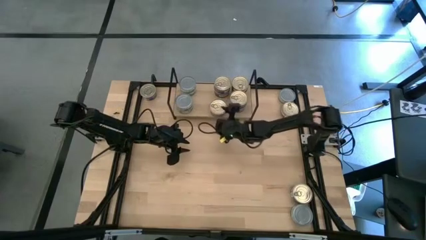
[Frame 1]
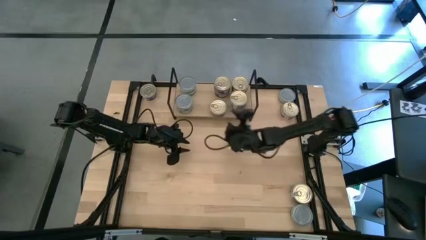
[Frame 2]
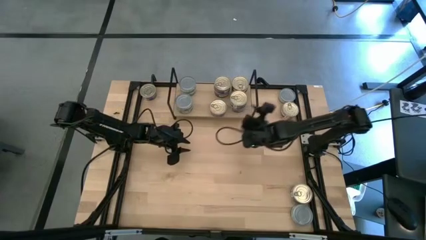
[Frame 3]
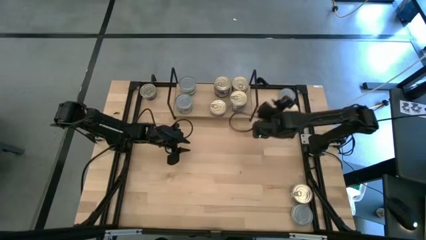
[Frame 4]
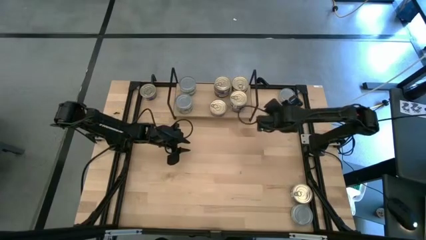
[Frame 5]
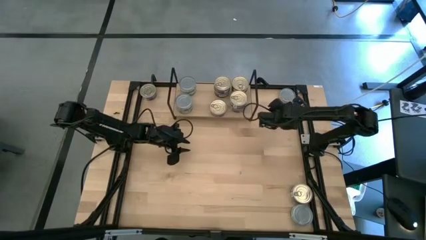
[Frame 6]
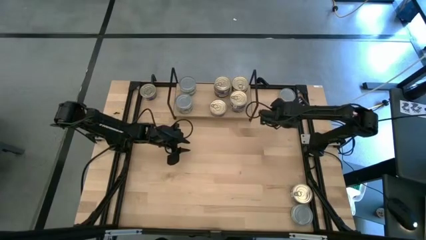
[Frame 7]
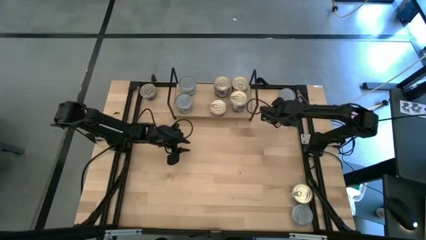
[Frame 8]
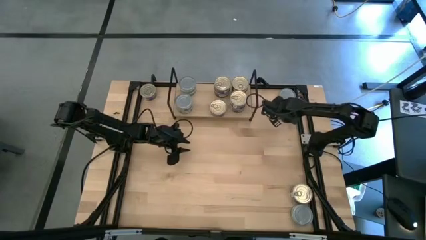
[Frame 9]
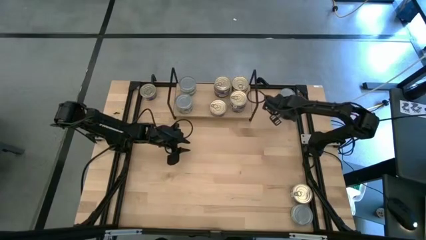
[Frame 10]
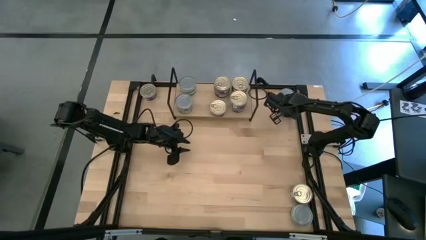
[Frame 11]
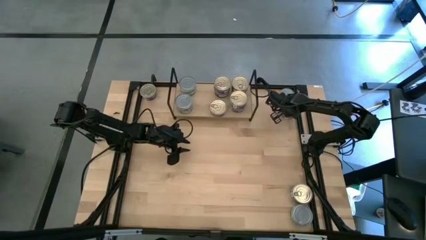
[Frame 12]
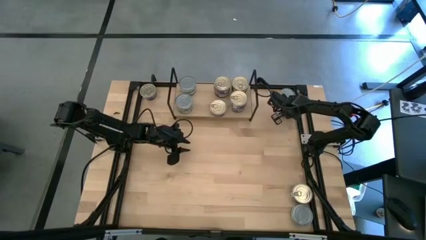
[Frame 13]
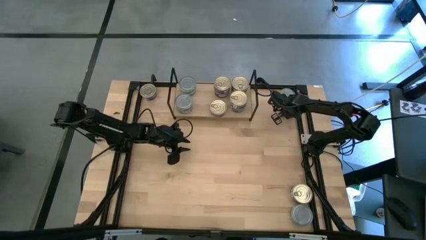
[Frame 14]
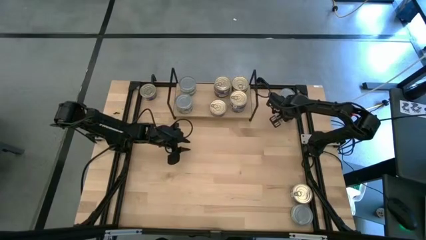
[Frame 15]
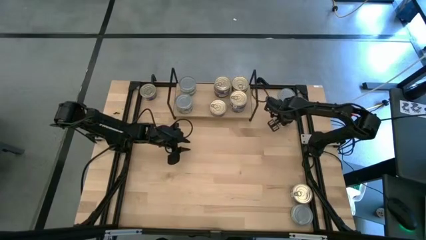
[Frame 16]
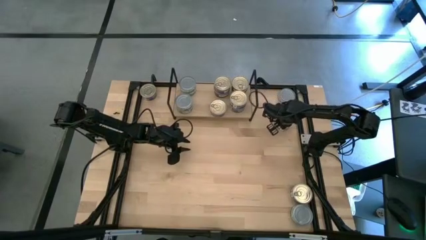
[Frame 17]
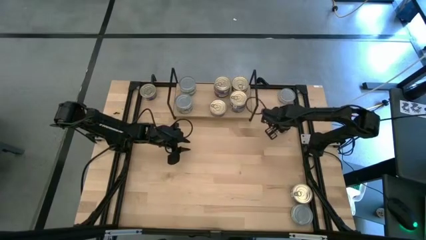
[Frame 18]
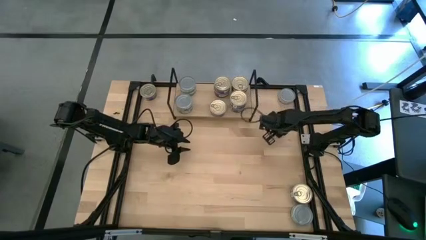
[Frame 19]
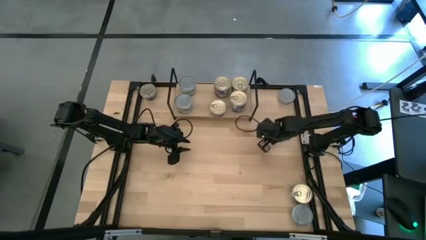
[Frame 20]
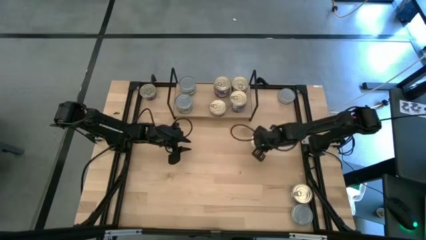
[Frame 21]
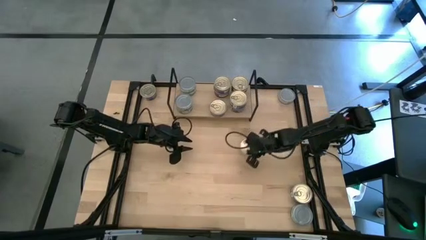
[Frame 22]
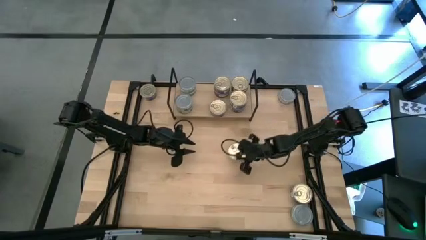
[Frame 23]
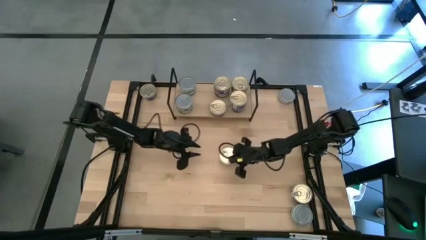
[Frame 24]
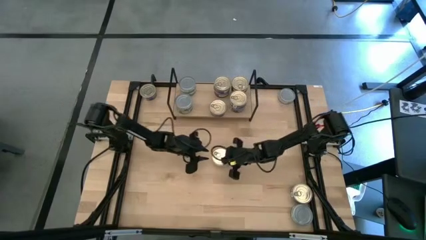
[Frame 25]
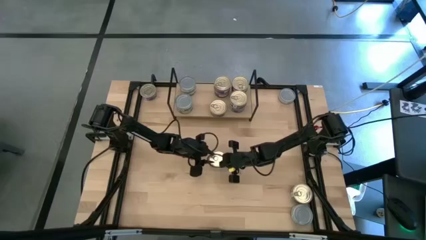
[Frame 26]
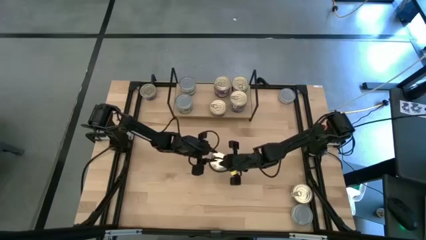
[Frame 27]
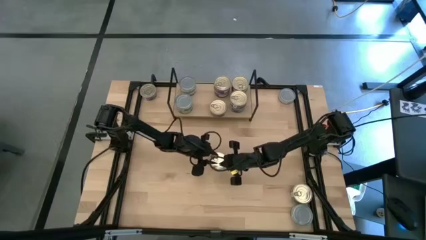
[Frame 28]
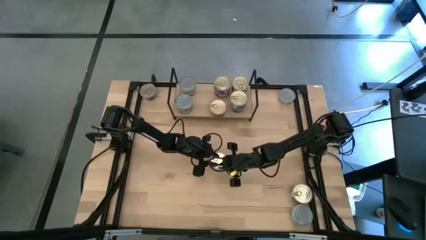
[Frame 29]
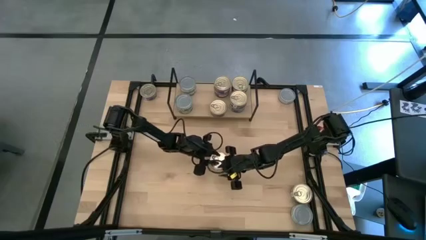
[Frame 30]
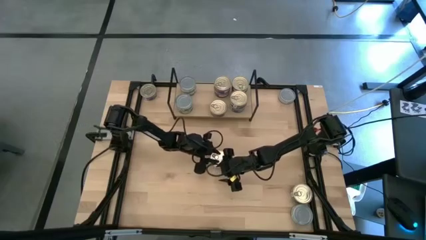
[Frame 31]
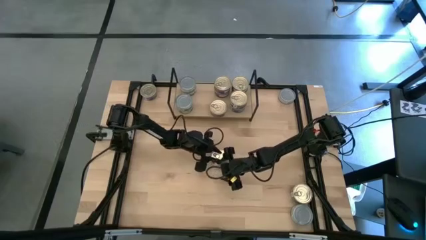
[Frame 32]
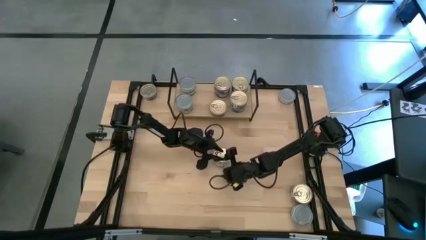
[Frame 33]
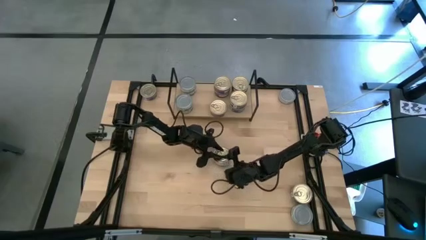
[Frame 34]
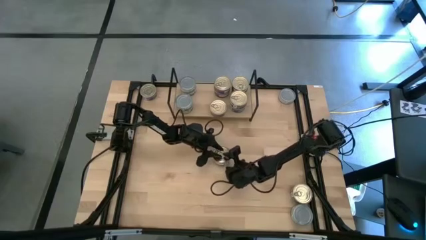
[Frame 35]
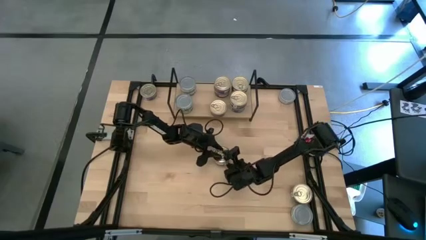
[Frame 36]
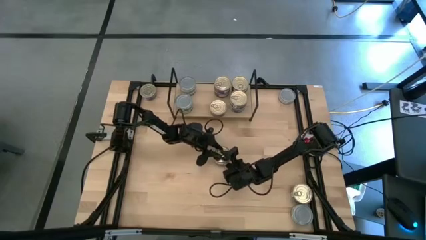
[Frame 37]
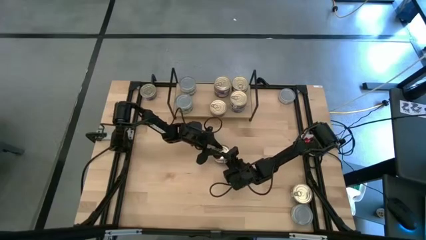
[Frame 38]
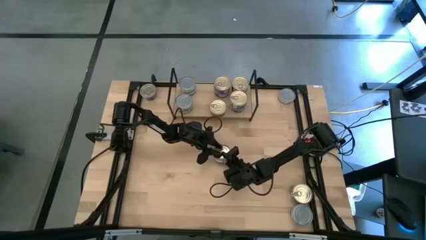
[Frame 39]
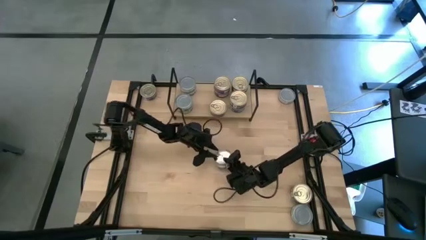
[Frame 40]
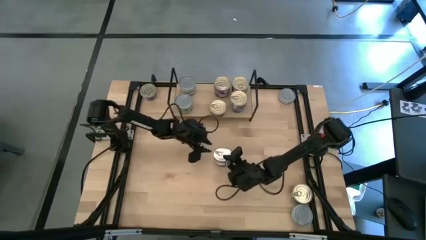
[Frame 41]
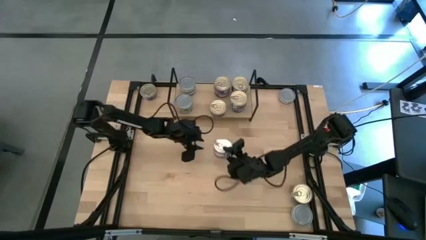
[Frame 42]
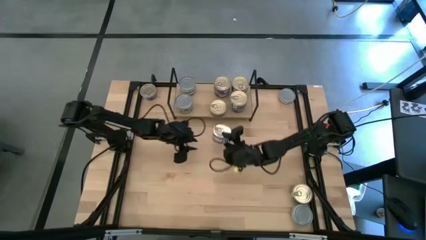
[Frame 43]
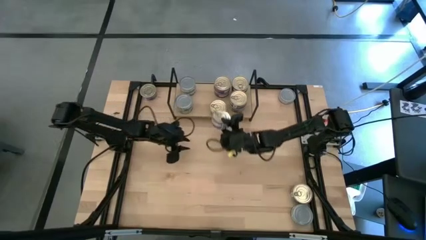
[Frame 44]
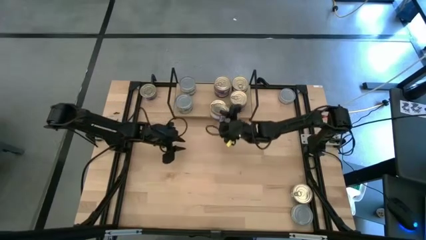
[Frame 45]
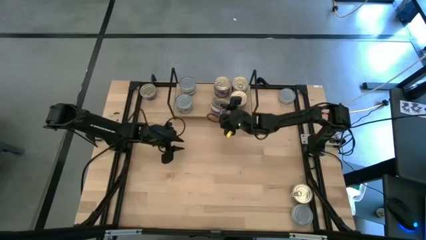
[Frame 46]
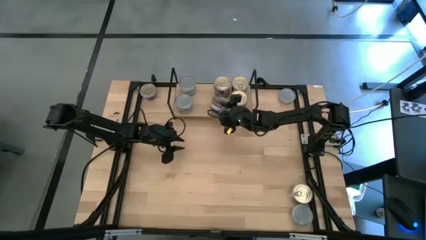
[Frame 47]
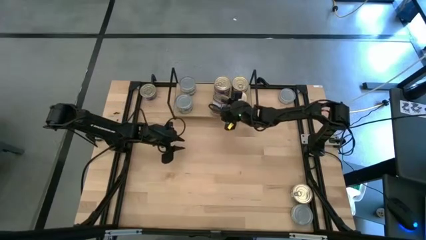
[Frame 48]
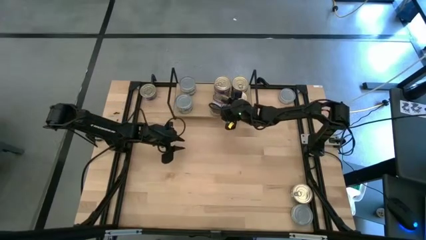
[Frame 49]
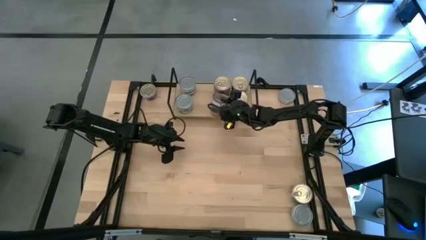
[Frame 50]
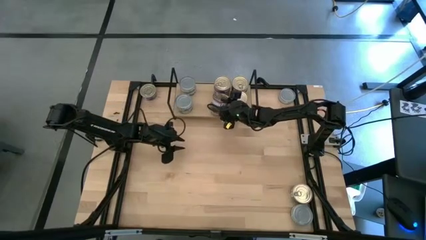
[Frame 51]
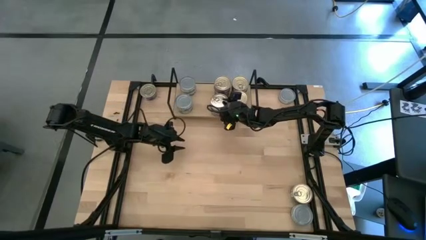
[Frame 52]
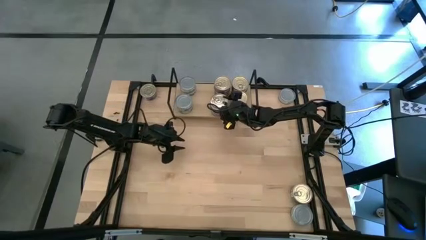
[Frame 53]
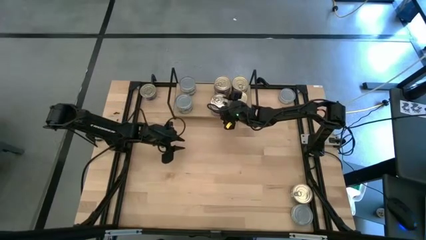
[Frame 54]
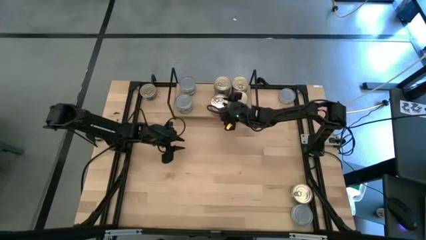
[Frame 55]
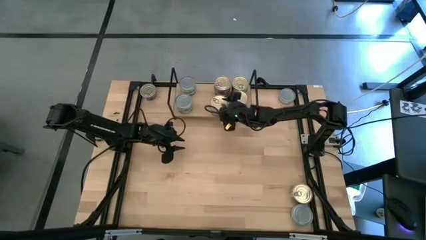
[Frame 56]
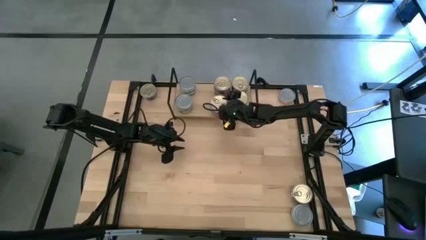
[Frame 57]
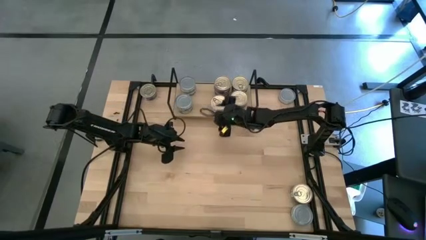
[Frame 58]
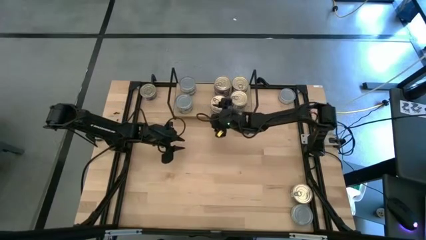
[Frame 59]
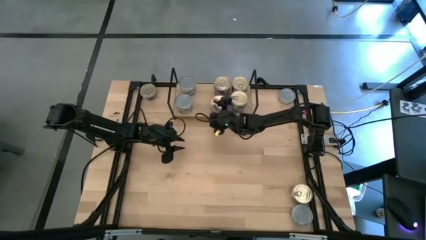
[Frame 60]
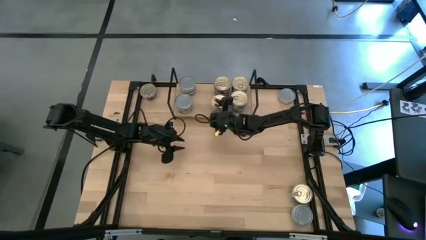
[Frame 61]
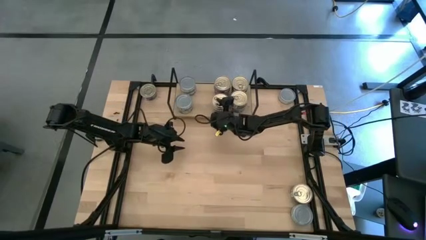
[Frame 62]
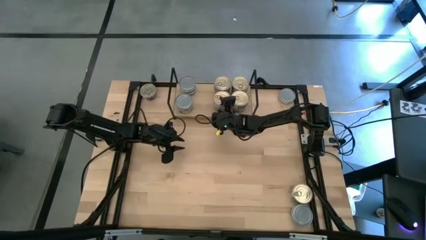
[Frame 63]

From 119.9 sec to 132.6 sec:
Task: Stack canned seafood by type on shelf
Stack the blue and pink tuna can on top of the blue and pink tuna can on the shelf

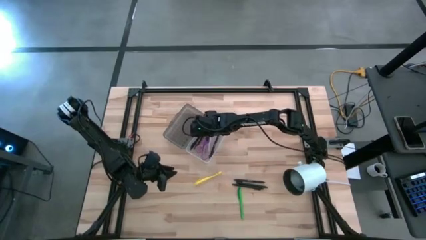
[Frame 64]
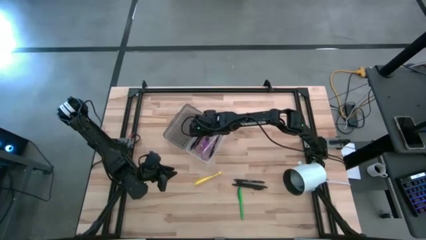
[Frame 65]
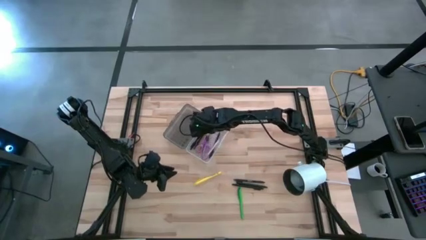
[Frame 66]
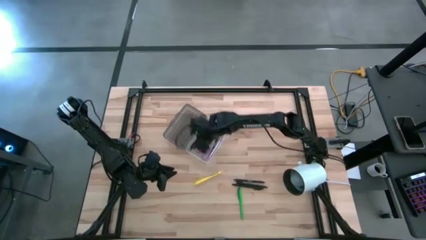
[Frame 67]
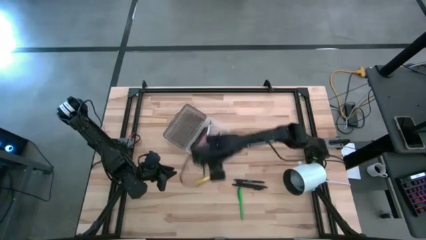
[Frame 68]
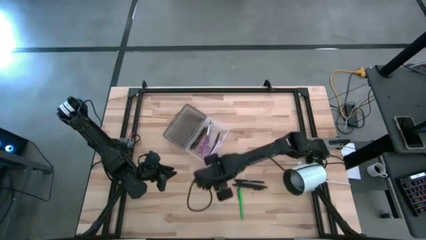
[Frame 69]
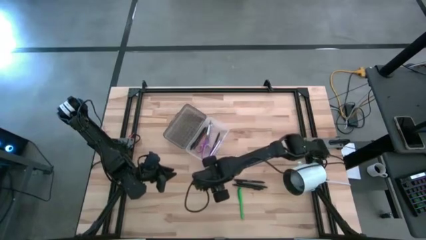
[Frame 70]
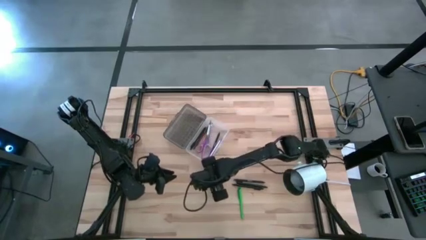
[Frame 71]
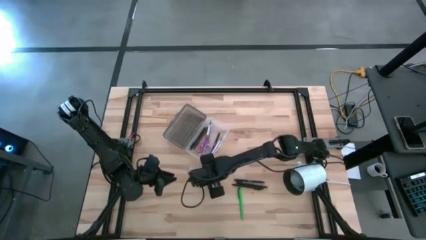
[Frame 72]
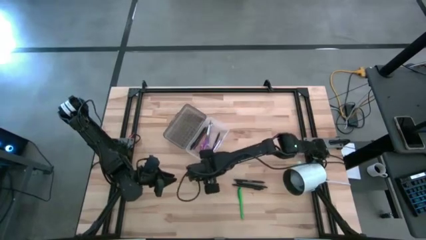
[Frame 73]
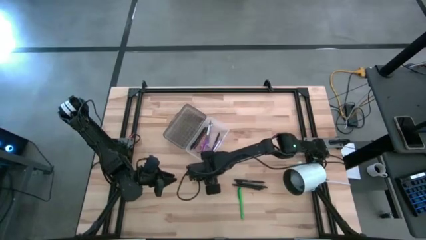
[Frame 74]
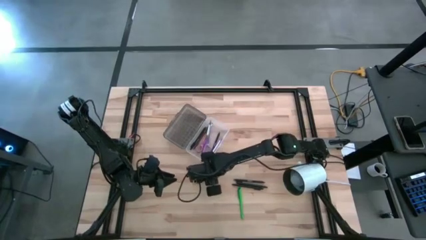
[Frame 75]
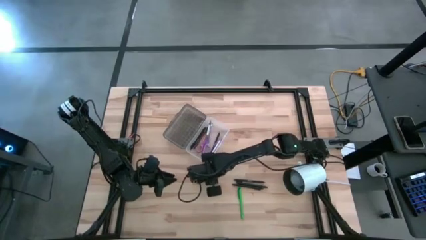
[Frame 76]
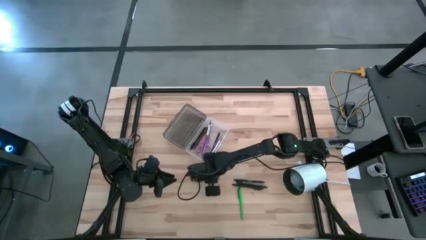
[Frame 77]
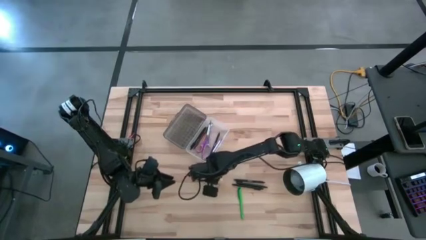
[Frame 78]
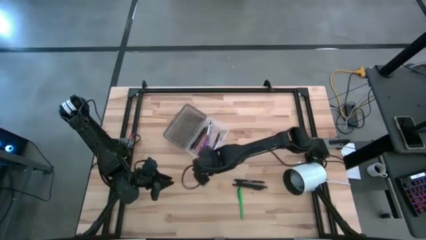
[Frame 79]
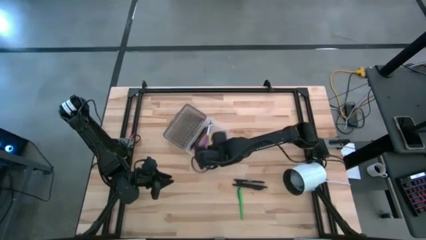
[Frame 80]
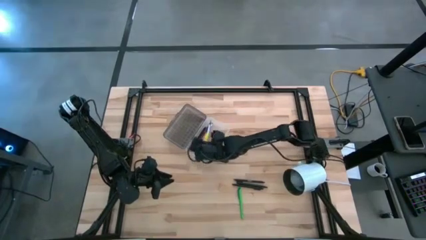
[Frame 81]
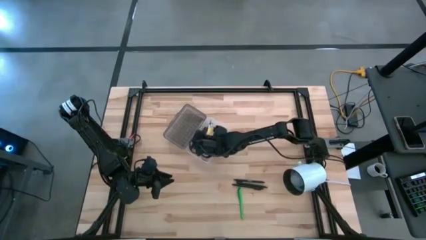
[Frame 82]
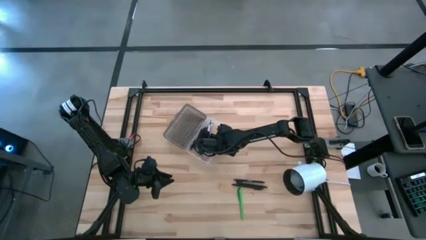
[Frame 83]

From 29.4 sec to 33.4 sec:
Task: Pick & place school supplies into a supply box
Put the yellow pen into the black supply box
